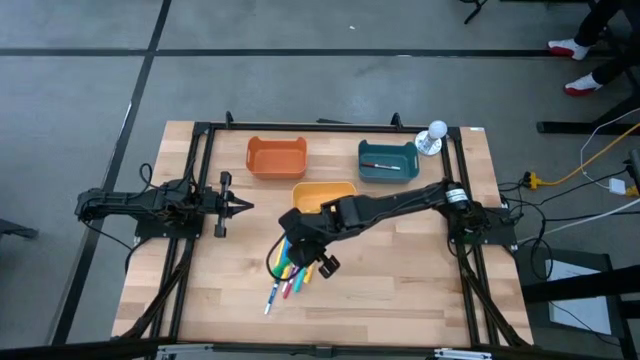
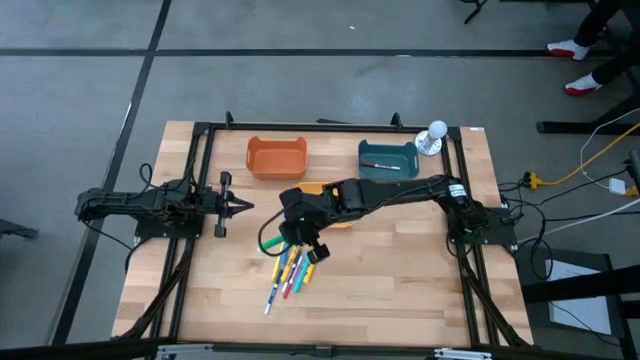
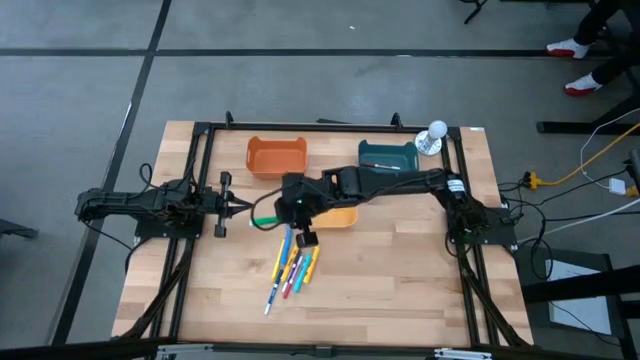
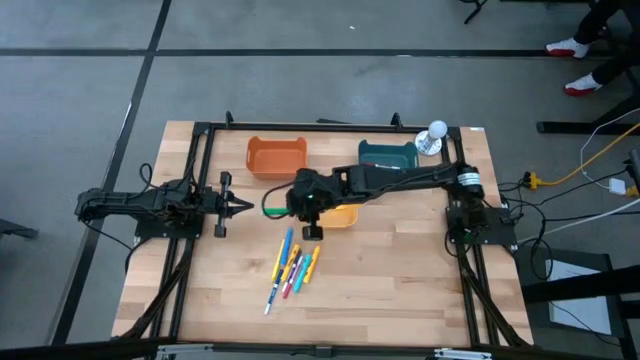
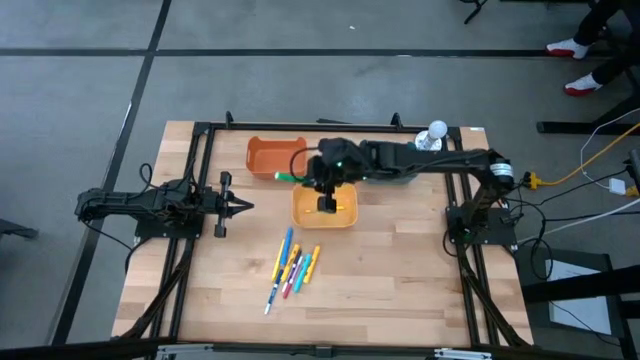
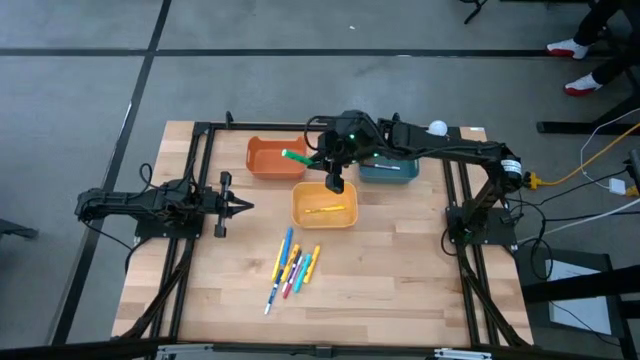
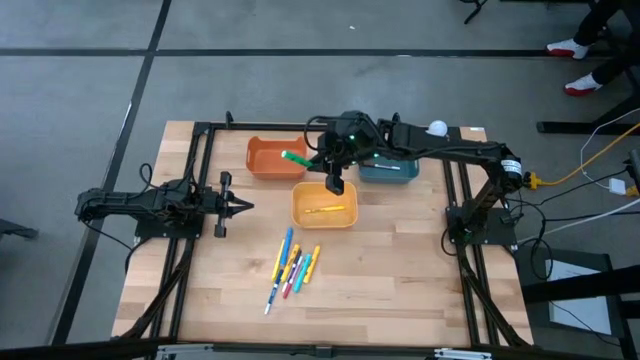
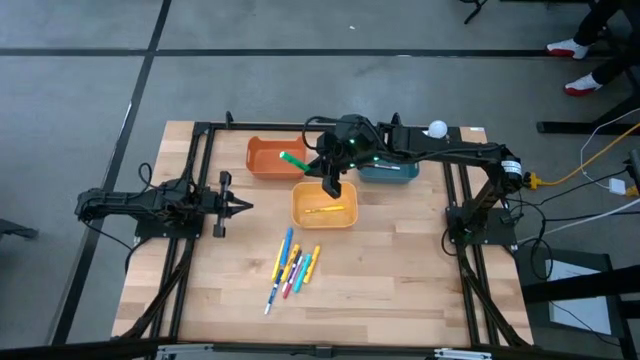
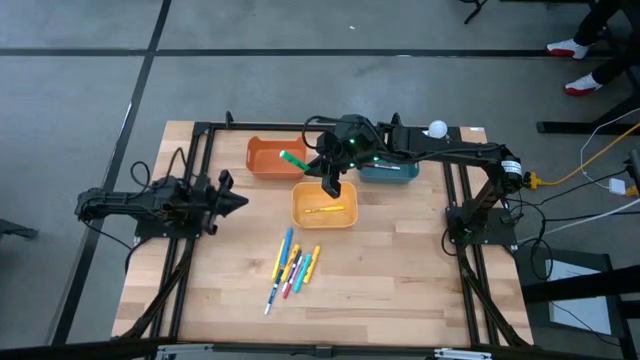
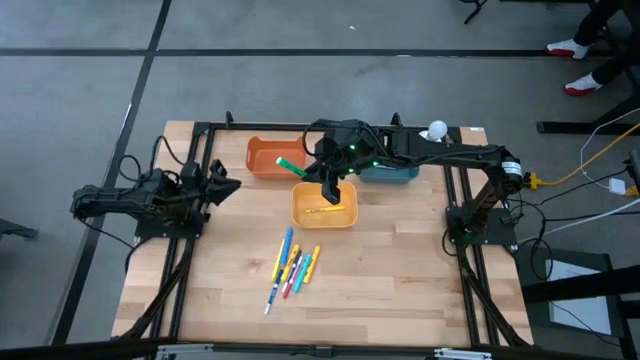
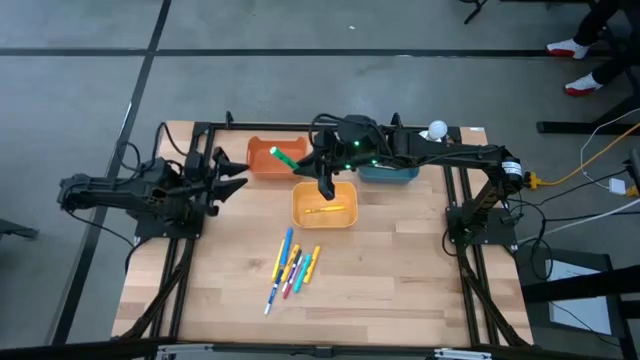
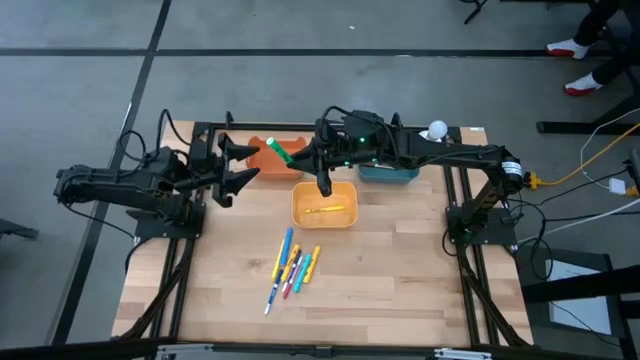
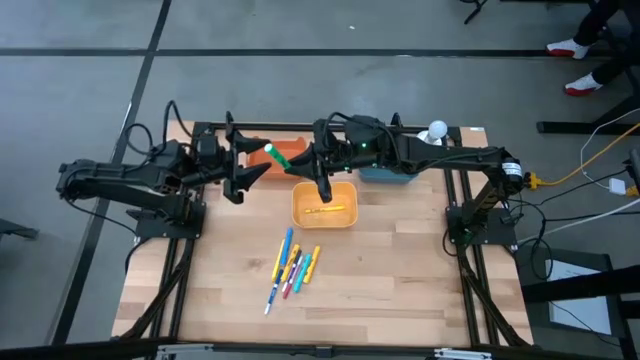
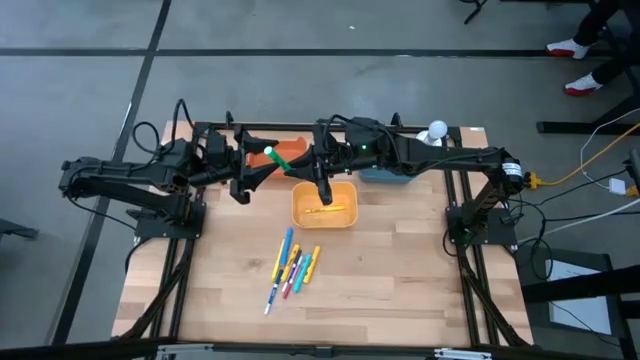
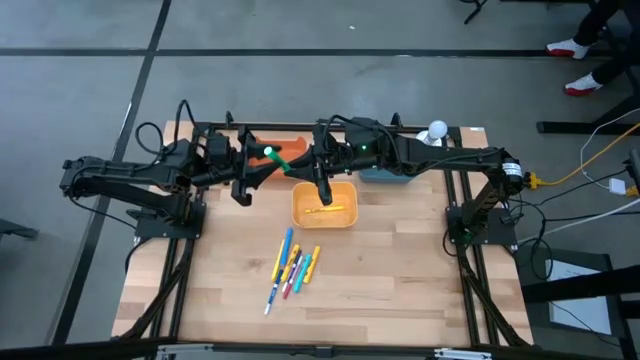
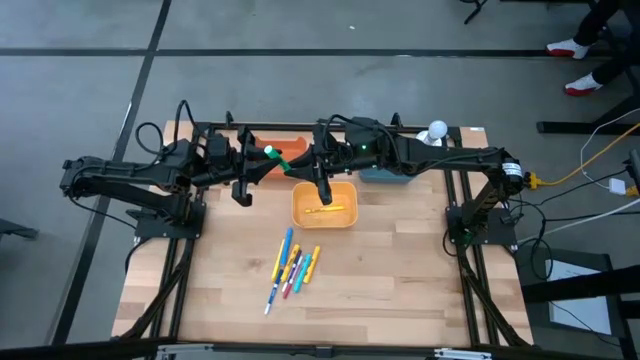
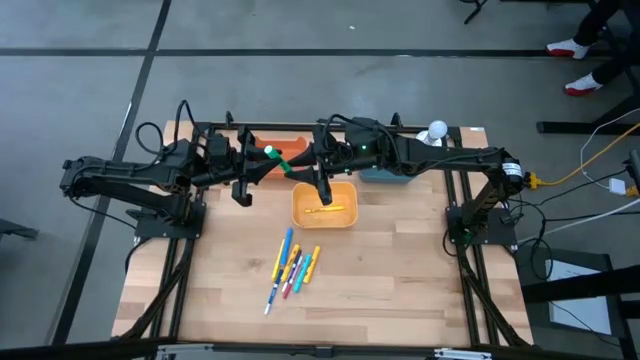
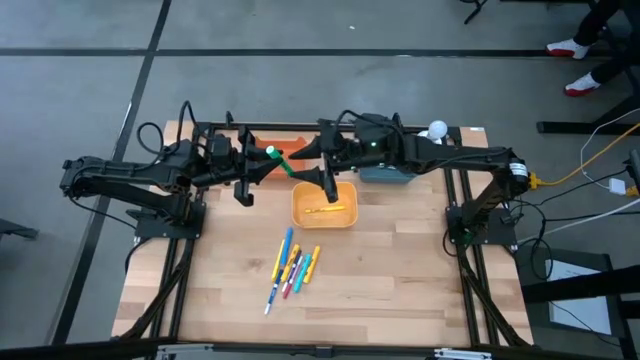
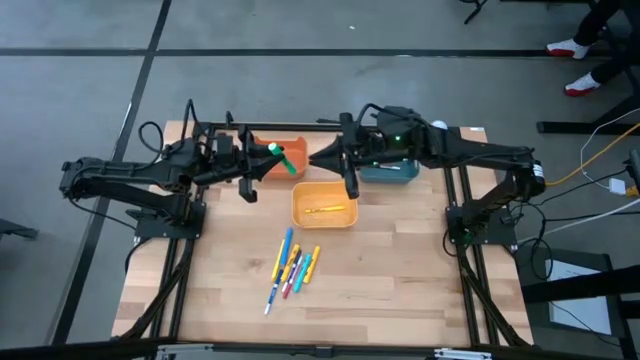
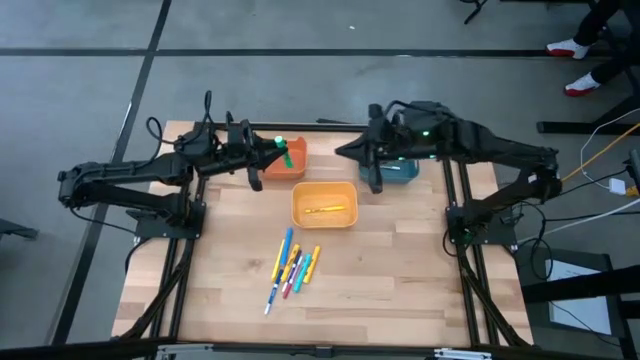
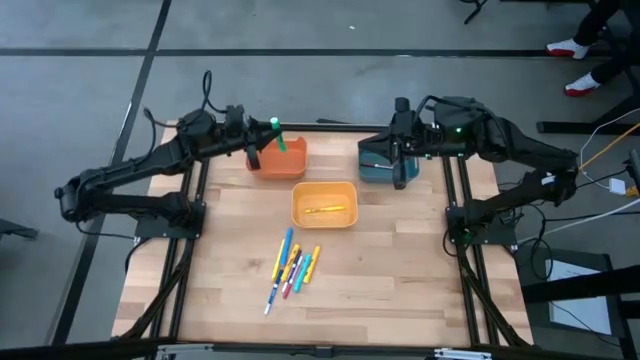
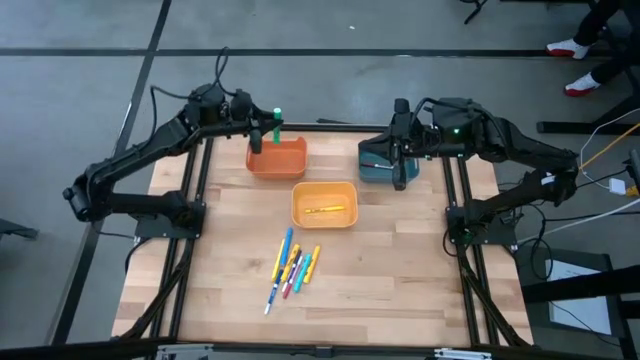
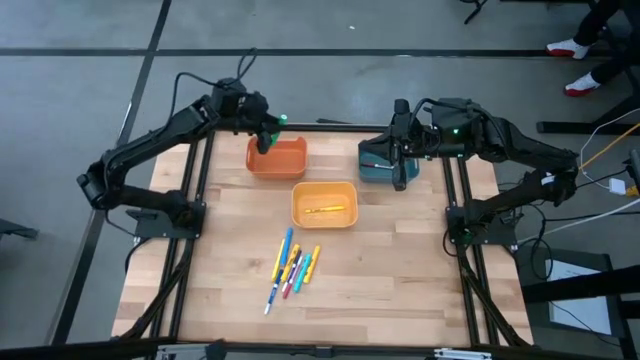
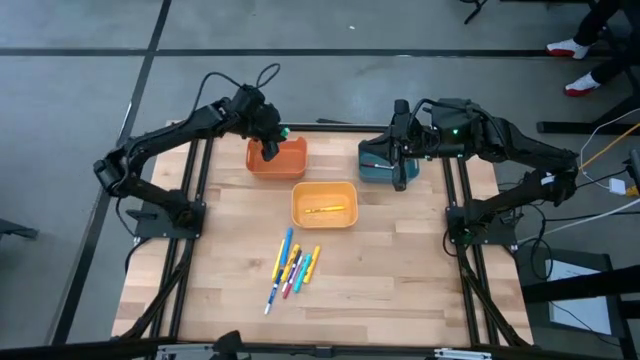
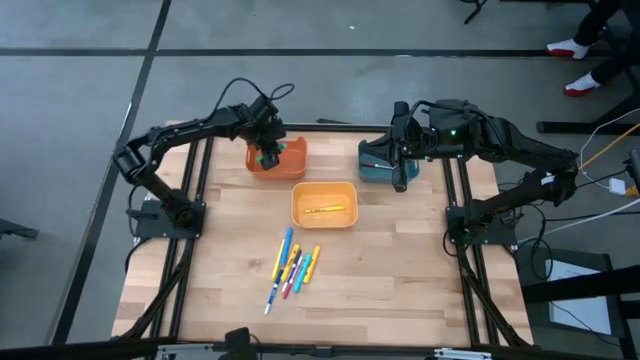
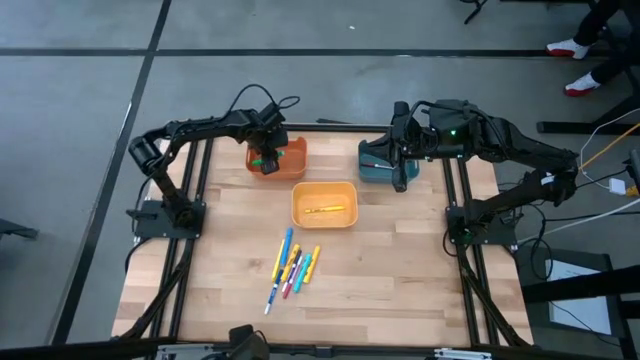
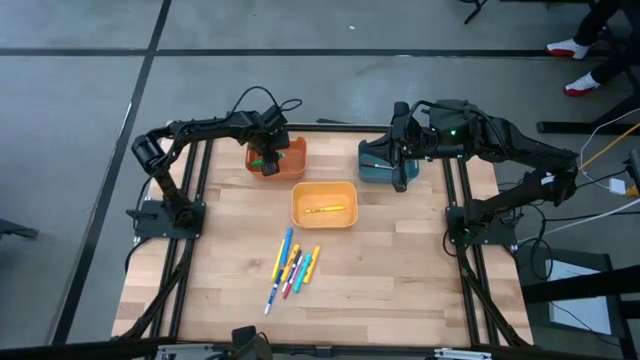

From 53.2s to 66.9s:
Task: Pick & Place Markers
Put the big green highlighter pen into the orange bin

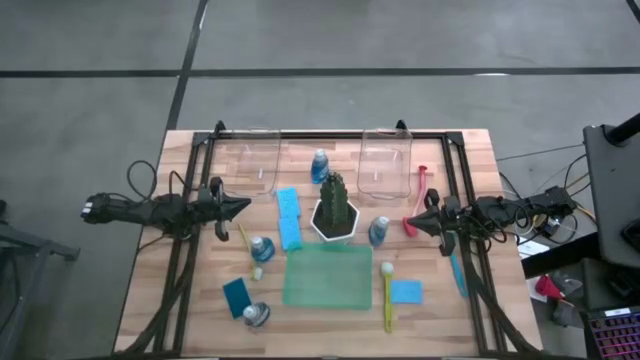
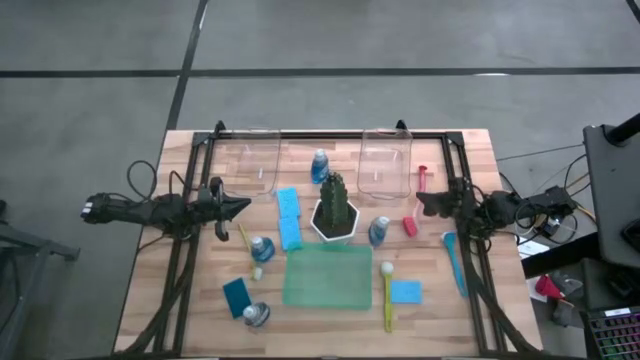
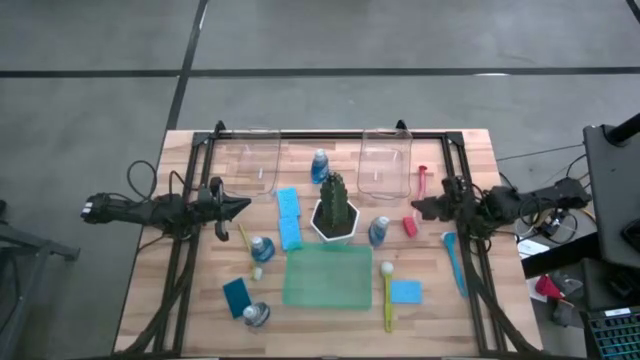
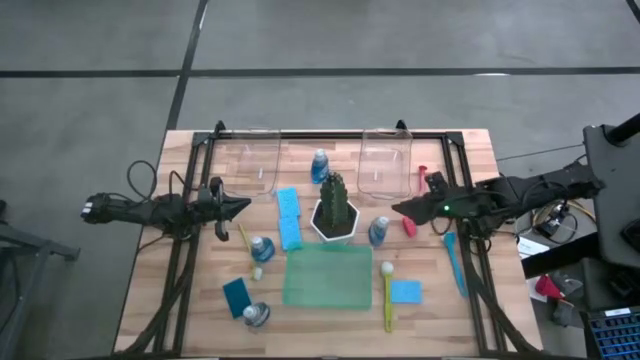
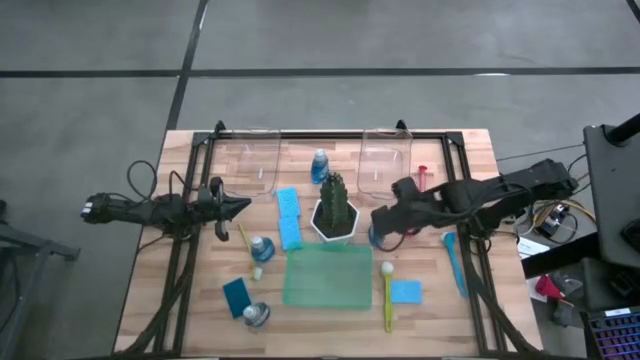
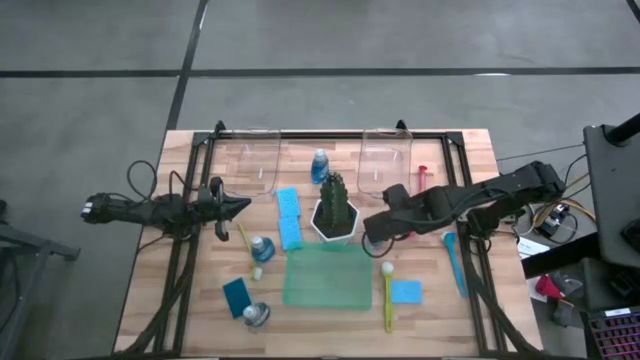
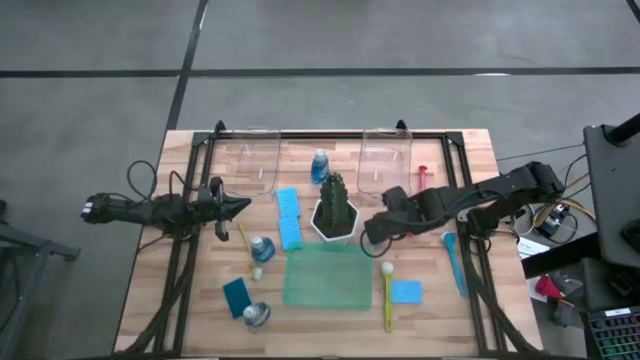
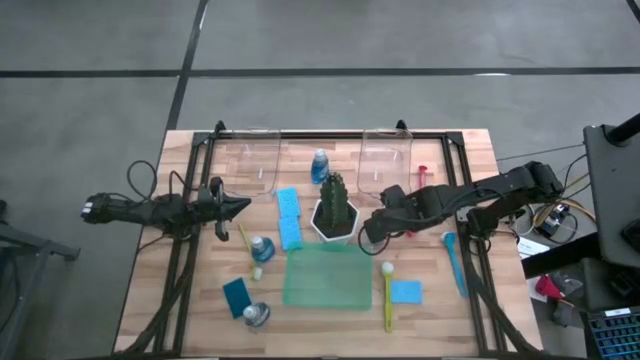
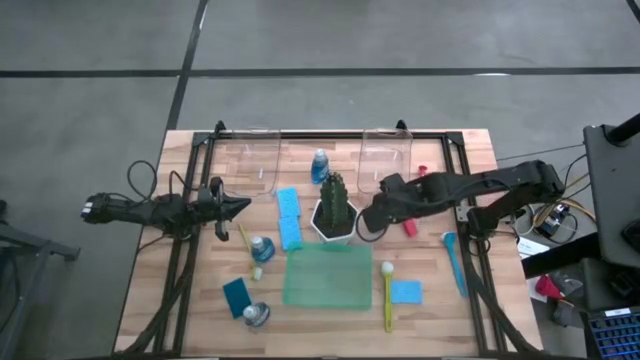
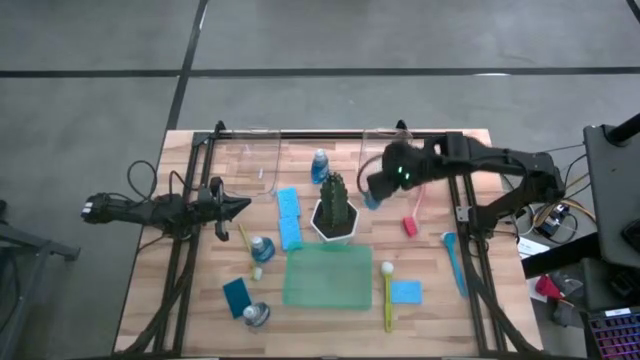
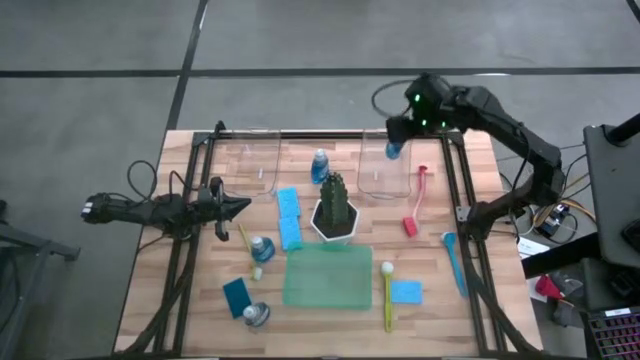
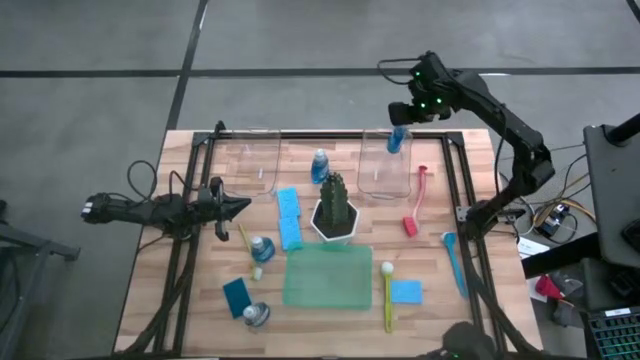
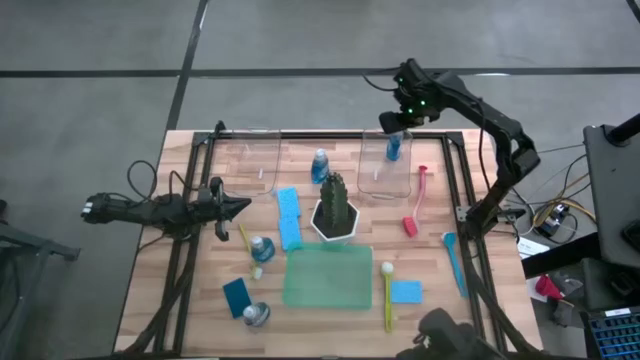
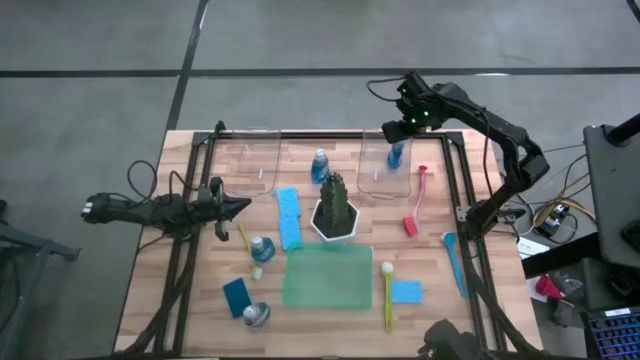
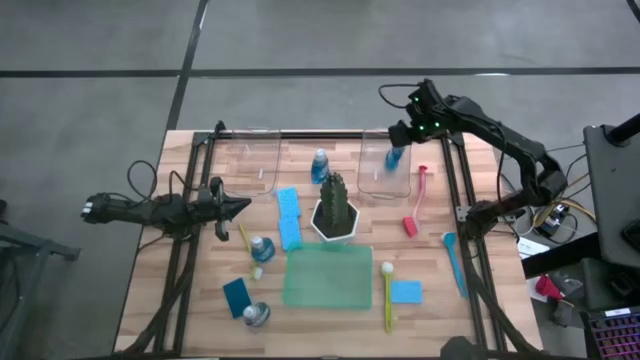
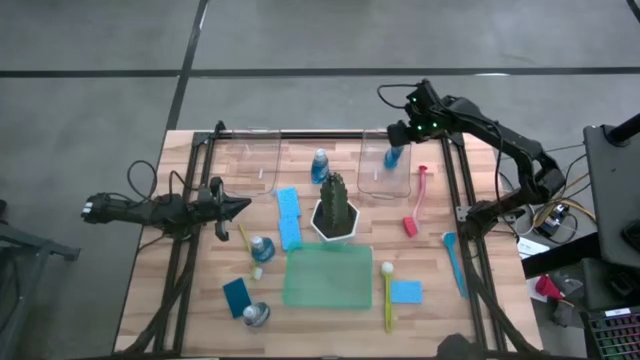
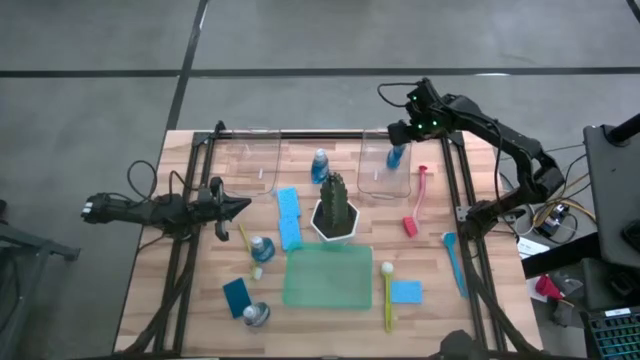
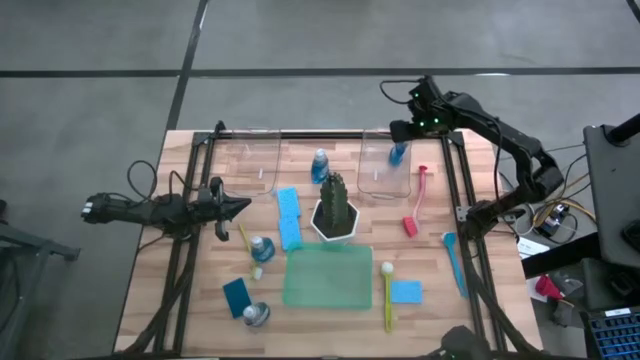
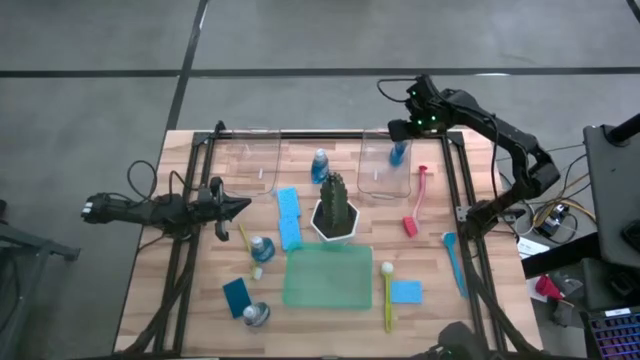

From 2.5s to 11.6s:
Task: Pick & Place Kitchen Sink Supplies
Put the dish soap into the right transparent bin
